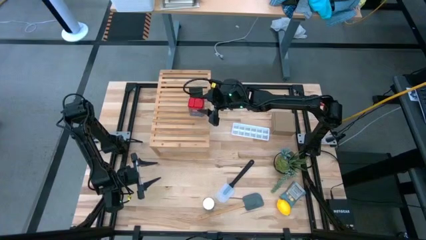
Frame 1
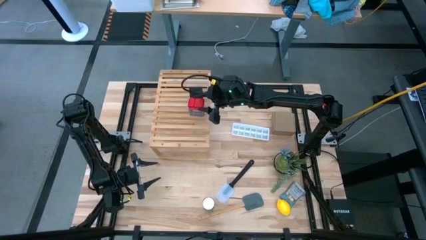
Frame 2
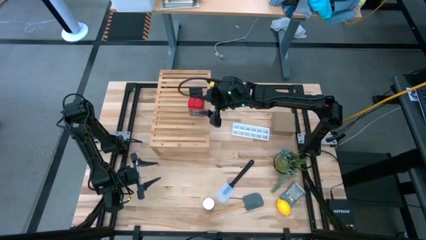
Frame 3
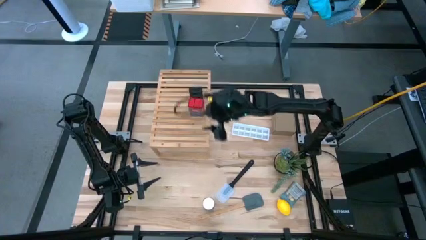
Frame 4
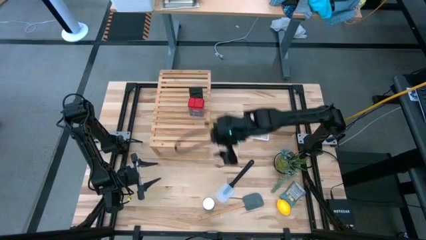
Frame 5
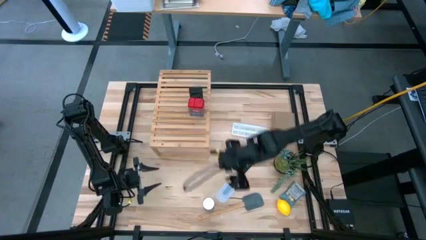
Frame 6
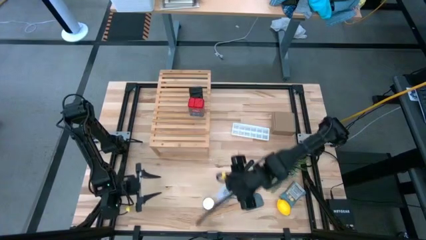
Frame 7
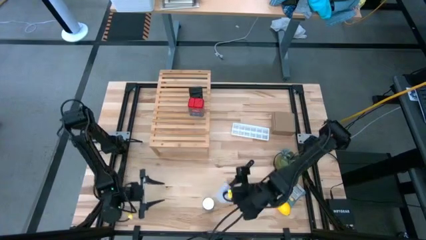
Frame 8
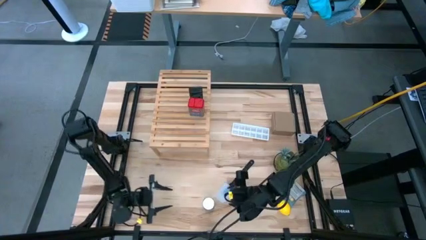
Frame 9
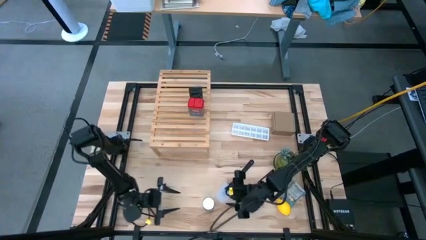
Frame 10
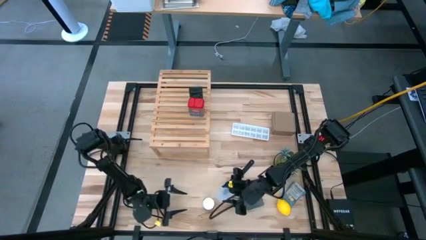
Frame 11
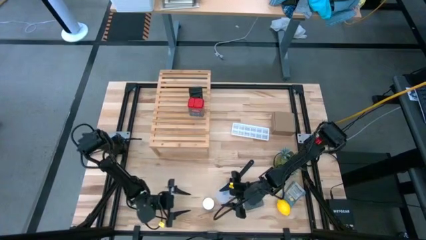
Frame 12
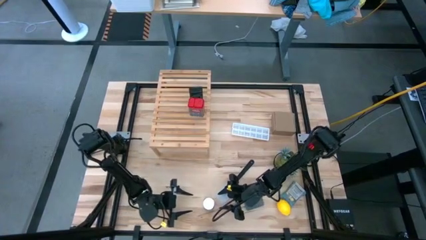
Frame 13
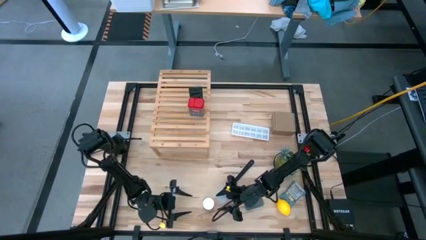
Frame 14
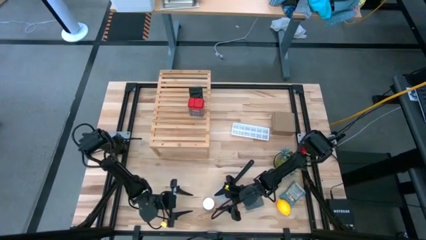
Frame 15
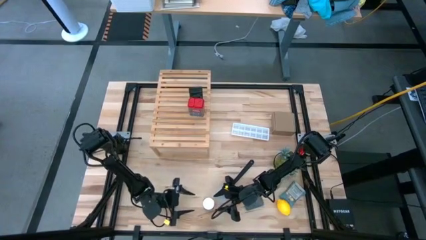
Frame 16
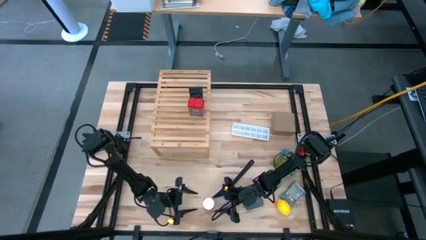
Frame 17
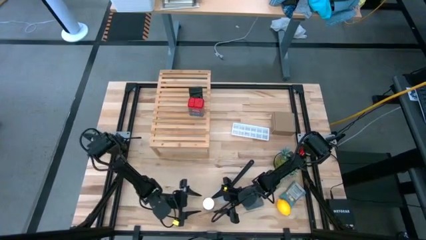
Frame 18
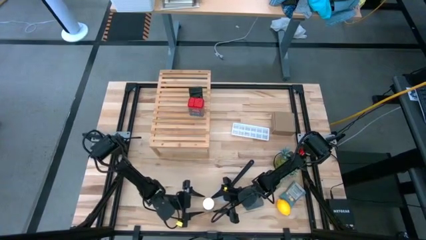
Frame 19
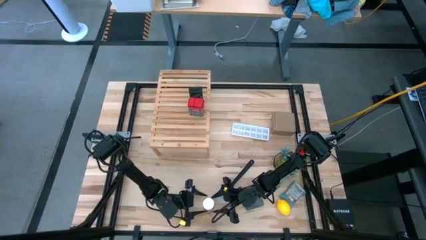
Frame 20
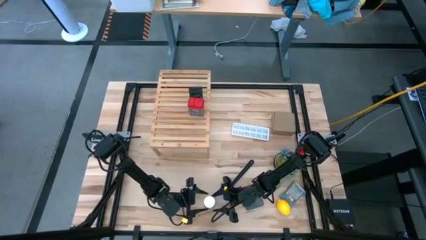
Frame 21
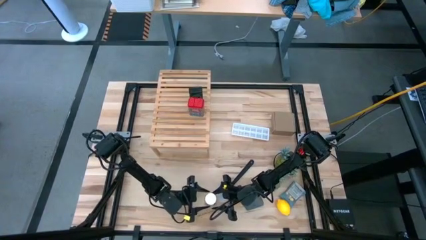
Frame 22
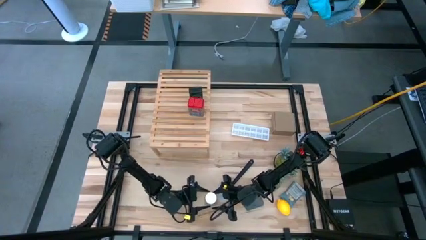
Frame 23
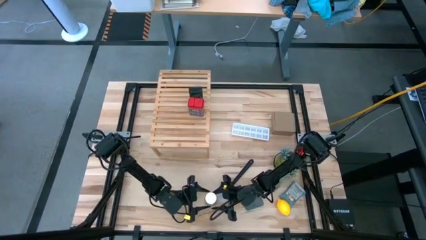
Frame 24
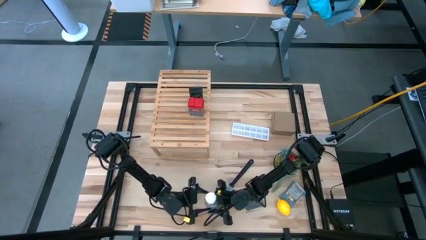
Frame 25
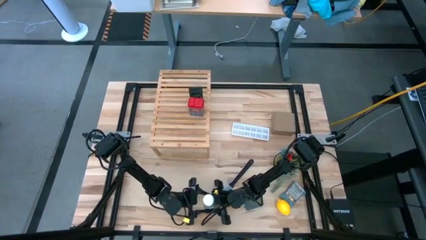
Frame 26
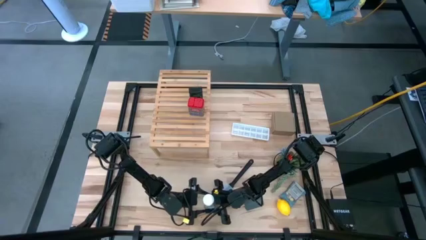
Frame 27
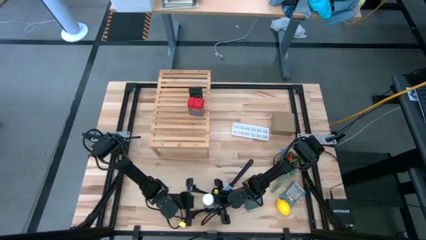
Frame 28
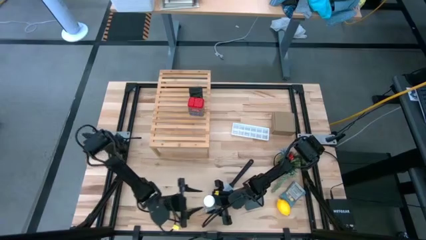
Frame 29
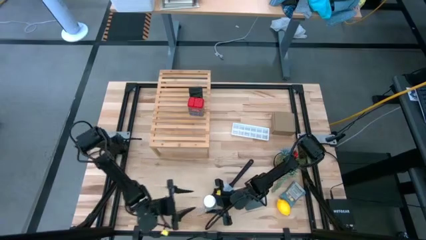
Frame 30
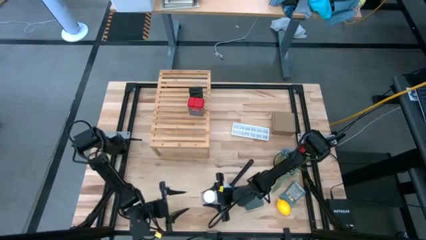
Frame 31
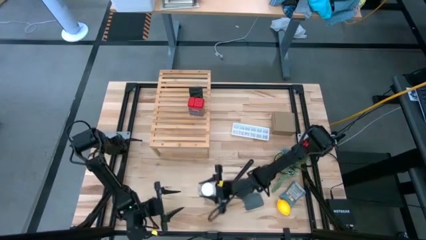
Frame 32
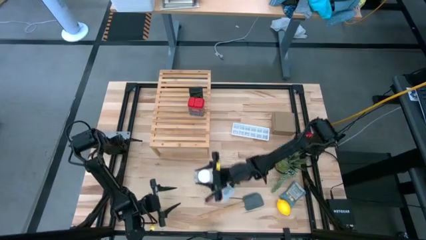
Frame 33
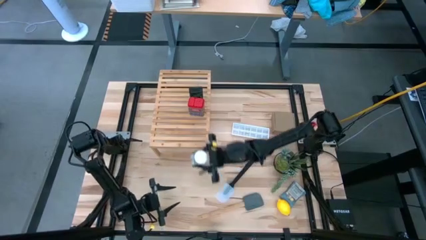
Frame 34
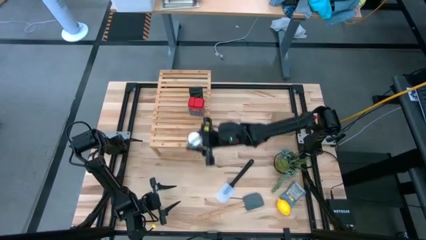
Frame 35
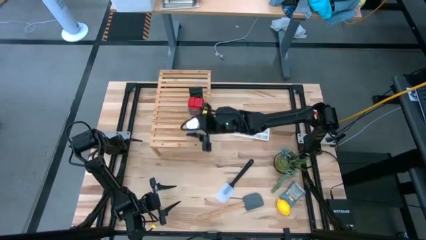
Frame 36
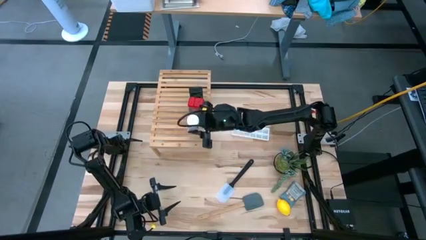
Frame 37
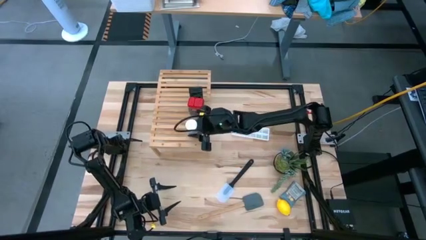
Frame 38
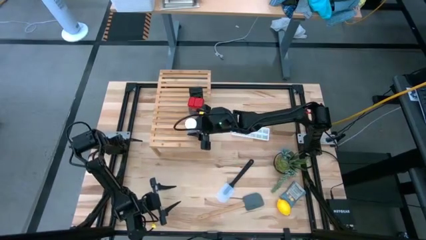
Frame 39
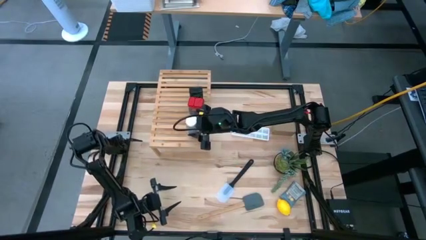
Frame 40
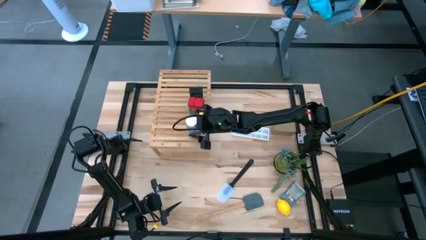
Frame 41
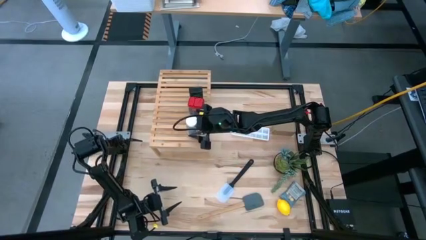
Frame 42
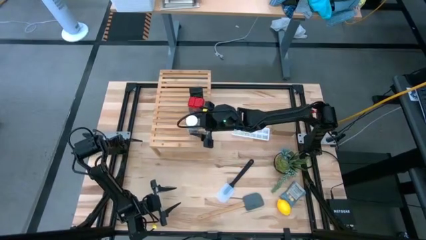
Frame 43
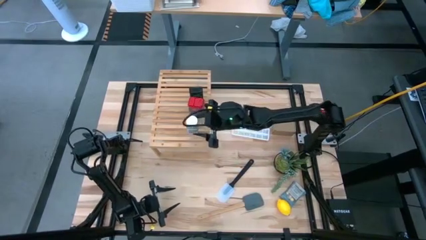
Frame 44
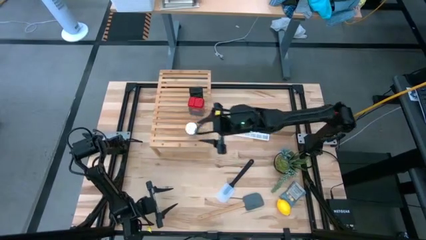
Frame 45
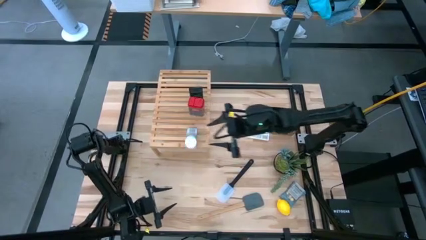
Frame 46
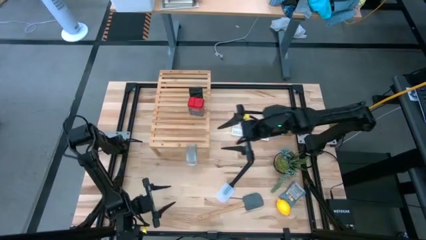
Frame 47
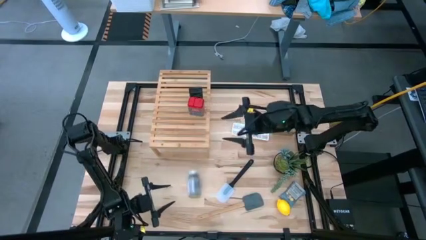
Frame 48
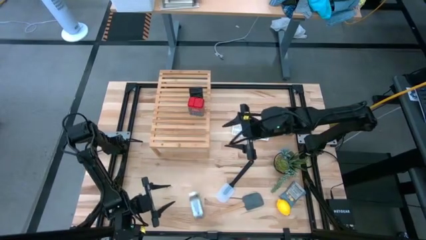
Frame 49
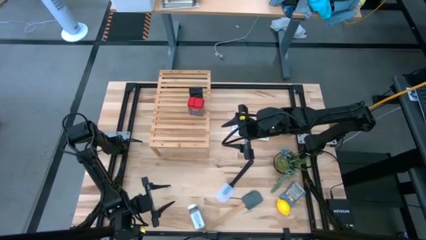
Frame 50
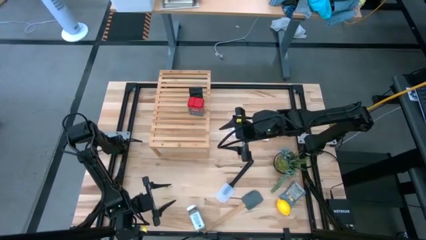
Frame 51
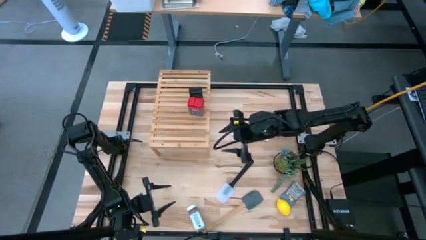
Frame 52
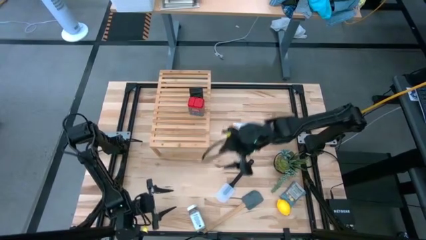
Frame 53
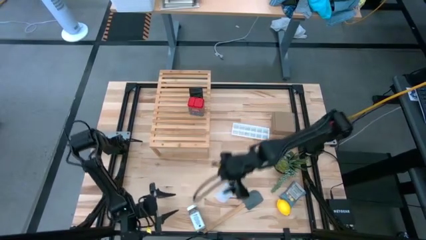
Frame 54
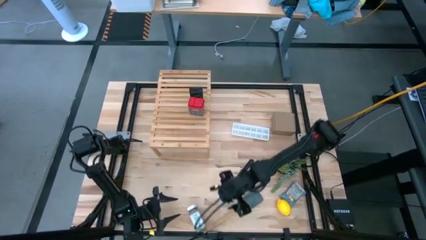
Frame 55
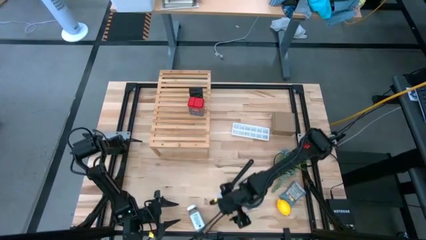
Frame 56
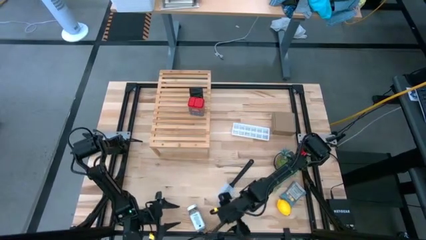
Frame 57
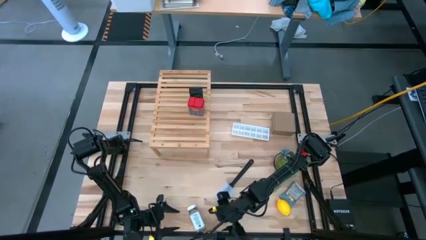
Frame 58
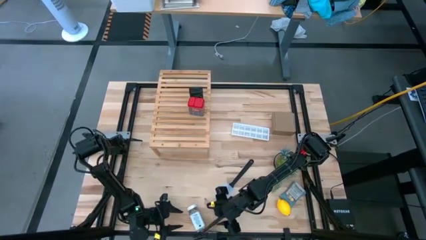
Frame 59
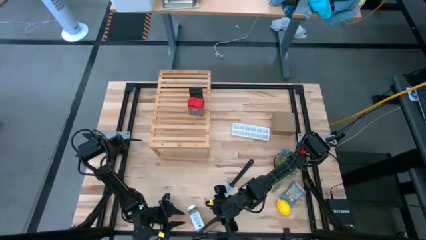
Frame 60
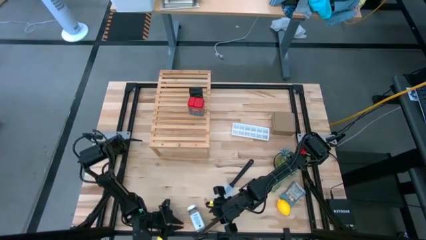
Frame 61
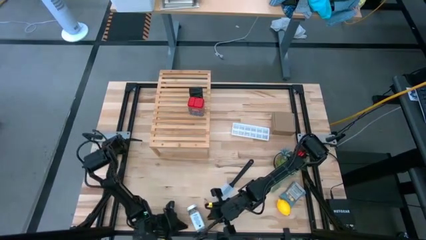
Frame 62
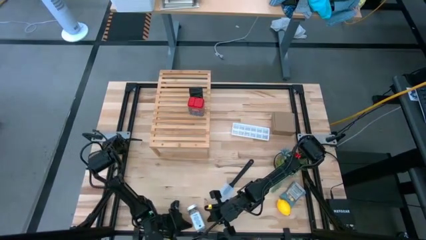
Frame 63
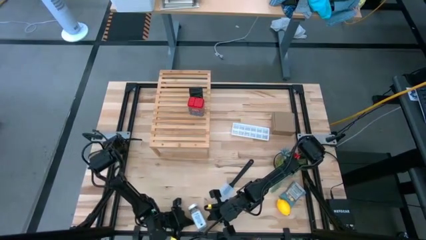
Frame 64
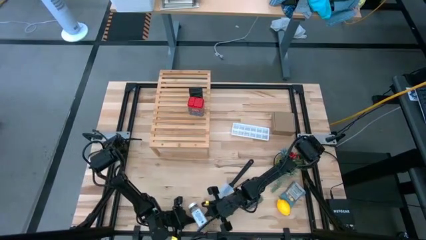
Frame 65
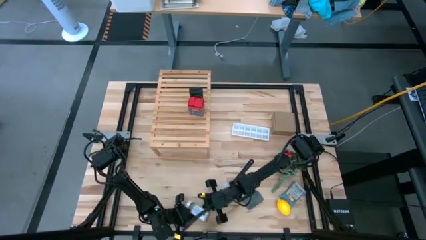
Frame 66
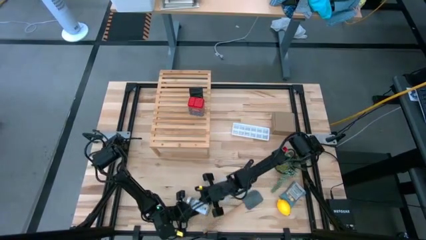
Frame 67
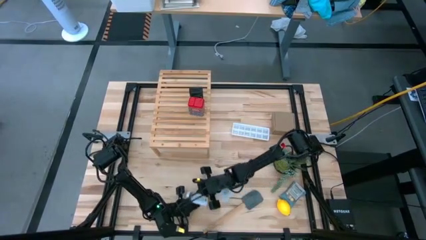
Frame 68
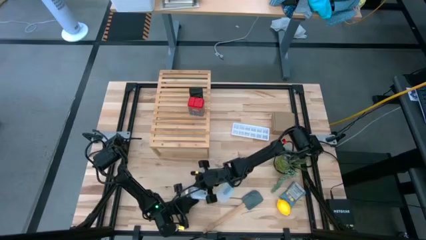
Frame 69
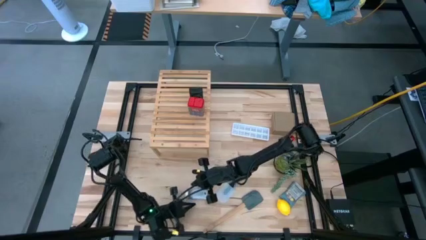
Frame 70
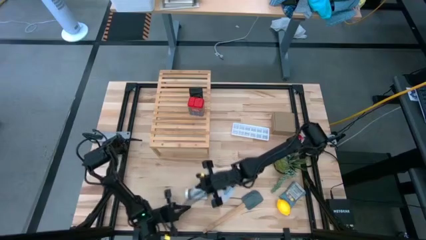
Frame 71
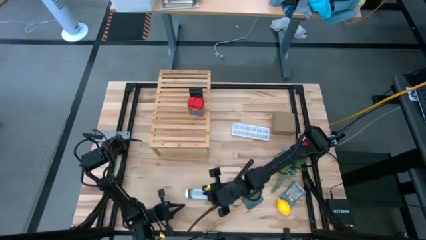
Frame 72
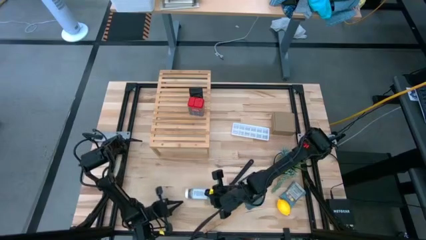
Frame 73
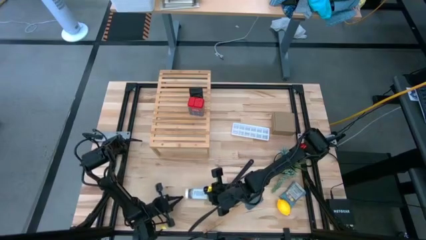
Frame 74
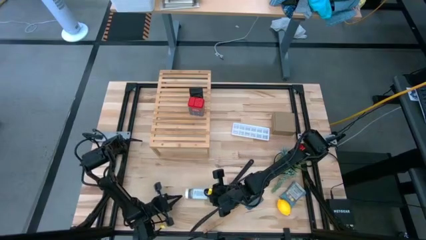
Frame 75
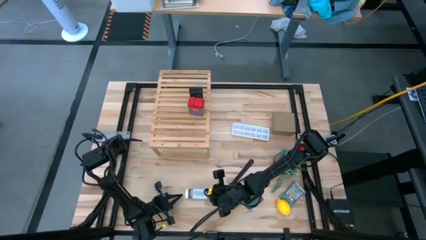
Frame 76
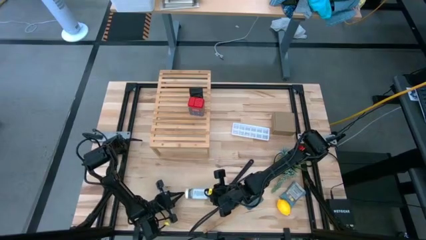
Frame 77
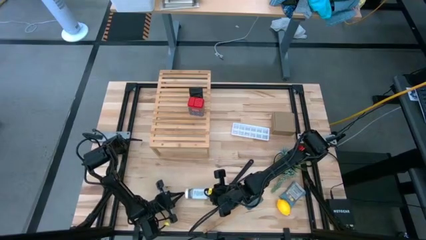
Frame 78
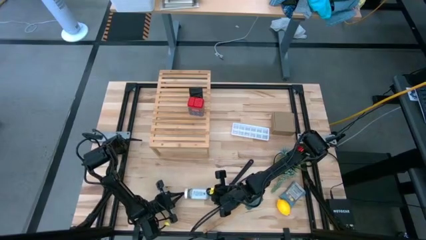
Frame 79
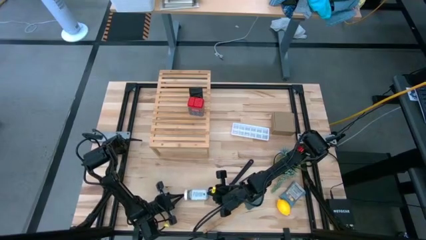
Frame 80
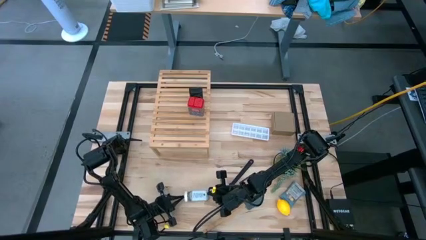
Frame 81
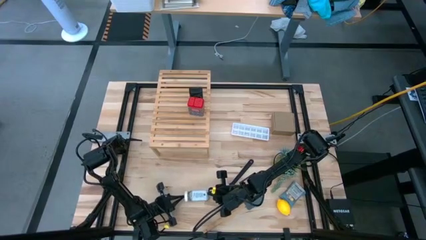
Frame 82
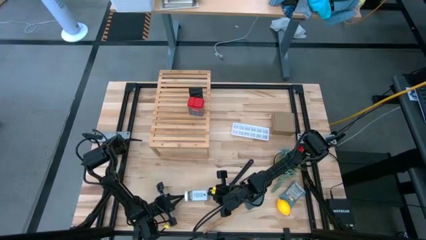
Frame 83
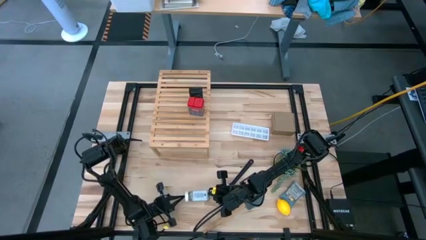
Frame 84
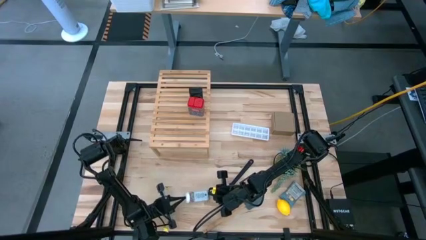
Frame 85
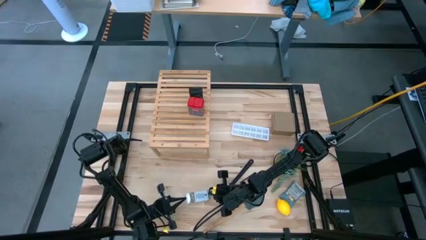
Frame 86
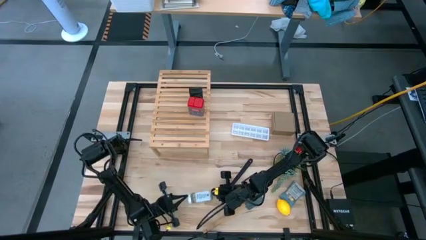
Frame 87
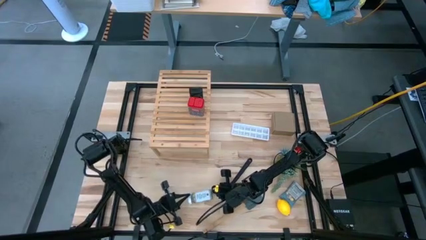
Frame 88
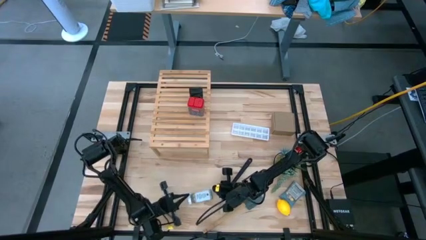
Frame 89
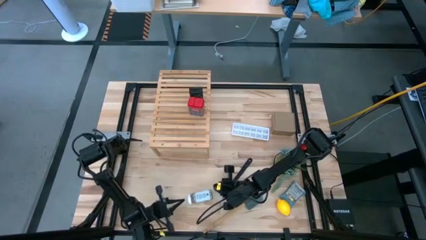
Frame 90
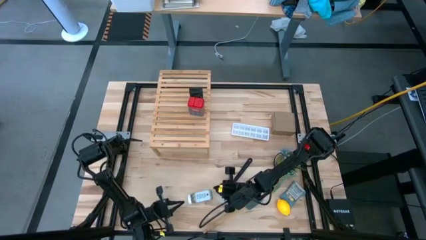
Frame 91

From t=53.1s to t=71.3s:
Task: Shelf spices
Put the white seasoning bottle on the shelf
